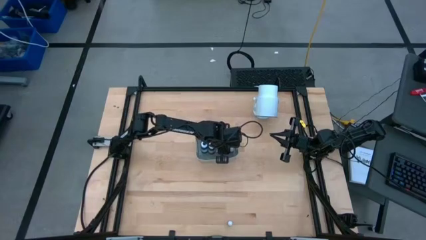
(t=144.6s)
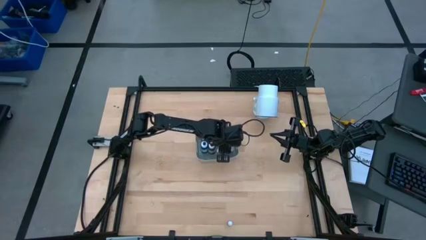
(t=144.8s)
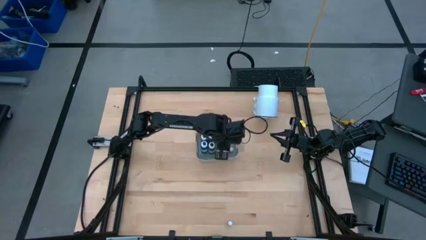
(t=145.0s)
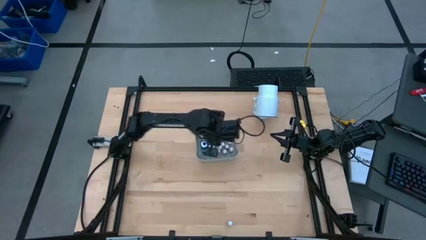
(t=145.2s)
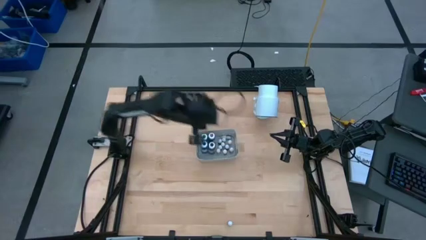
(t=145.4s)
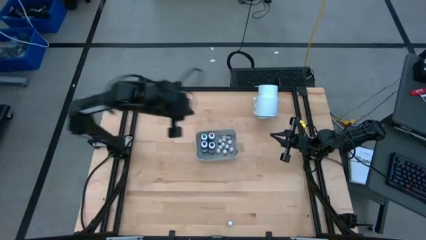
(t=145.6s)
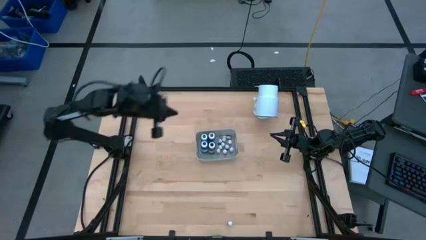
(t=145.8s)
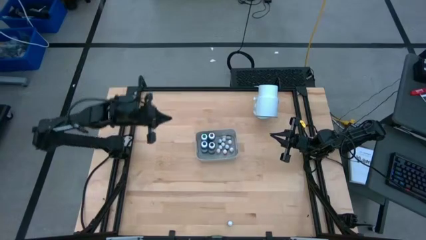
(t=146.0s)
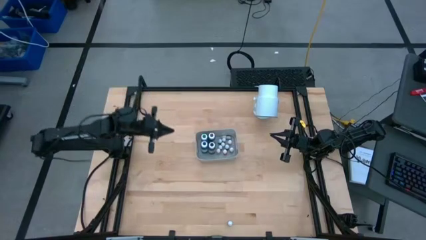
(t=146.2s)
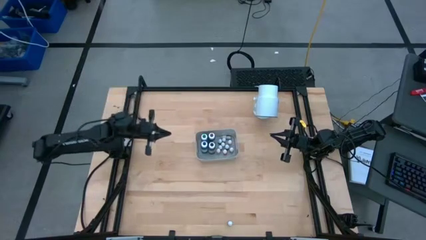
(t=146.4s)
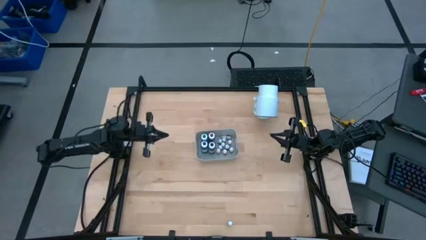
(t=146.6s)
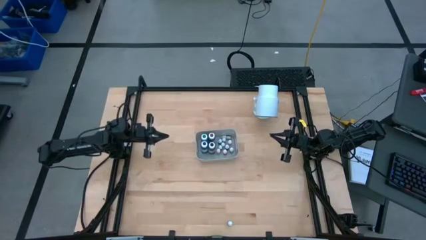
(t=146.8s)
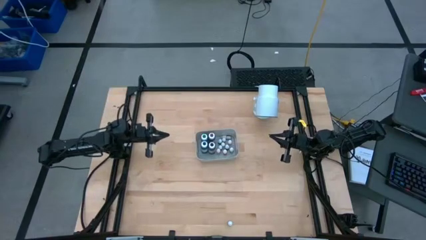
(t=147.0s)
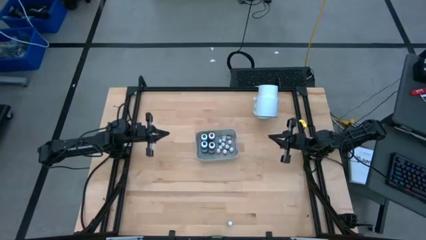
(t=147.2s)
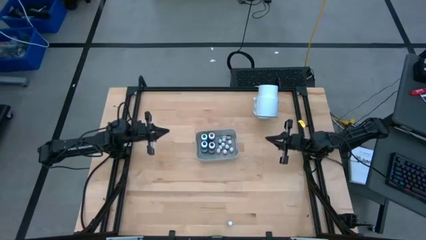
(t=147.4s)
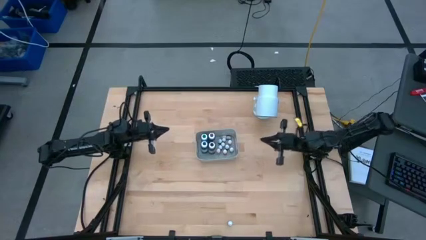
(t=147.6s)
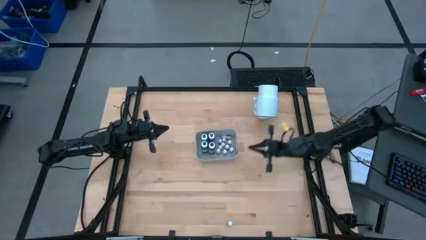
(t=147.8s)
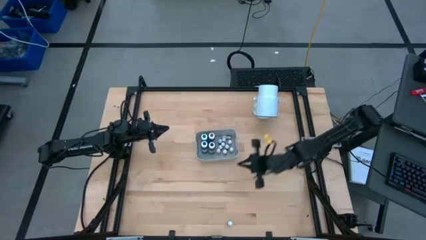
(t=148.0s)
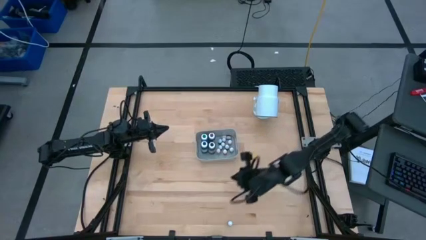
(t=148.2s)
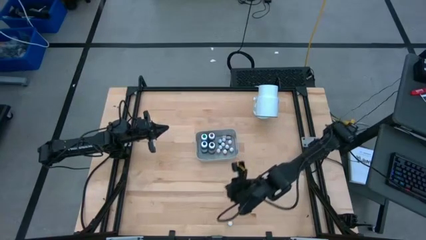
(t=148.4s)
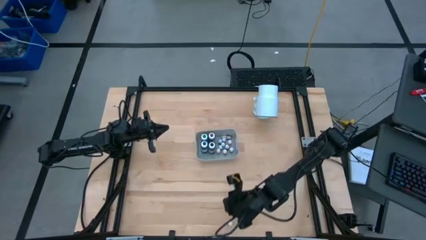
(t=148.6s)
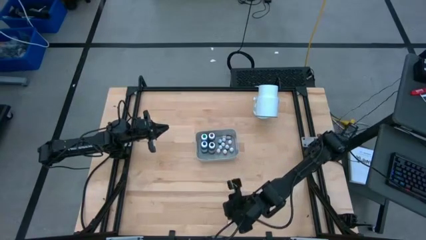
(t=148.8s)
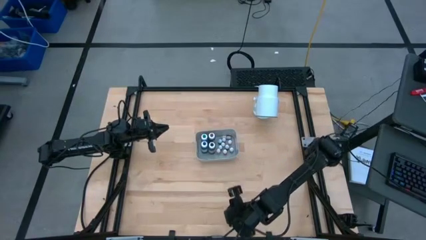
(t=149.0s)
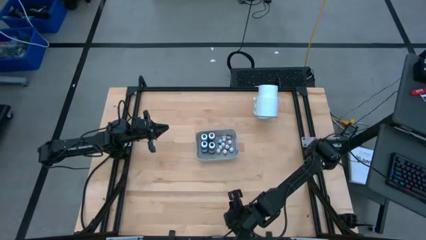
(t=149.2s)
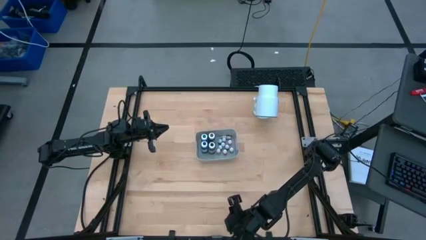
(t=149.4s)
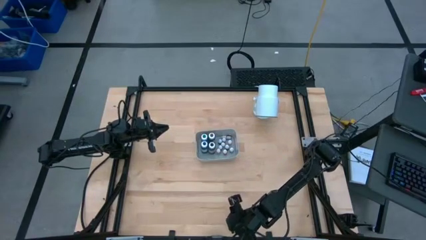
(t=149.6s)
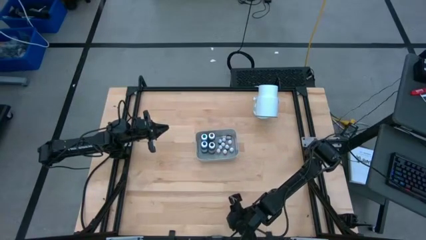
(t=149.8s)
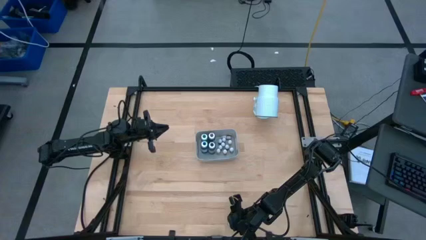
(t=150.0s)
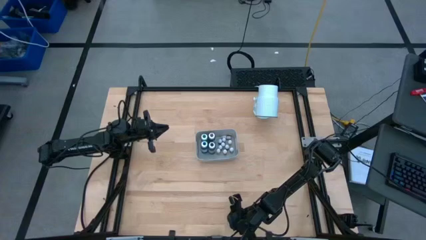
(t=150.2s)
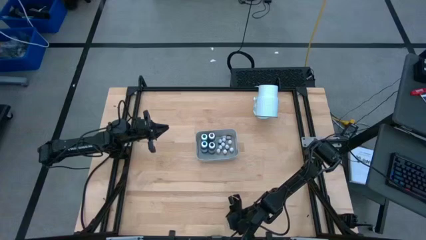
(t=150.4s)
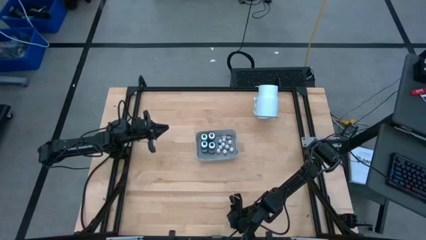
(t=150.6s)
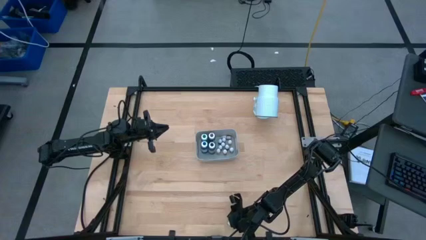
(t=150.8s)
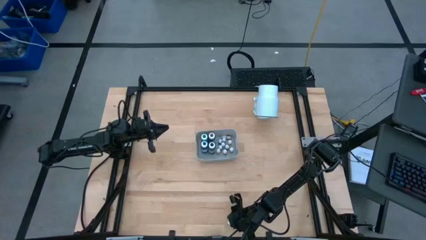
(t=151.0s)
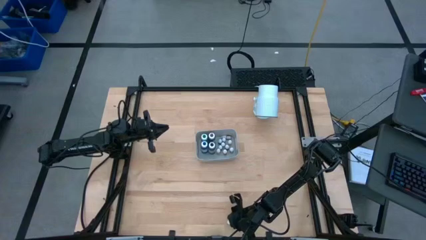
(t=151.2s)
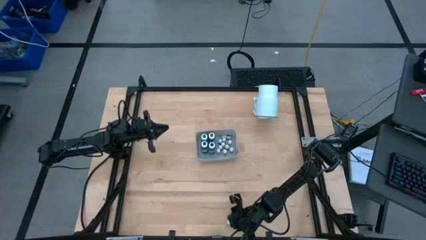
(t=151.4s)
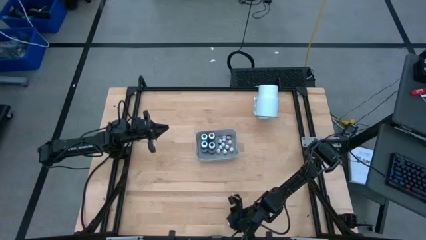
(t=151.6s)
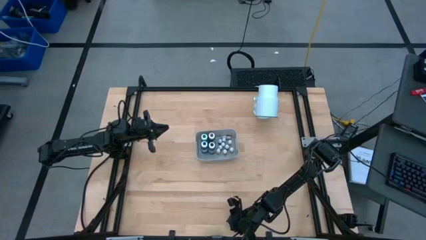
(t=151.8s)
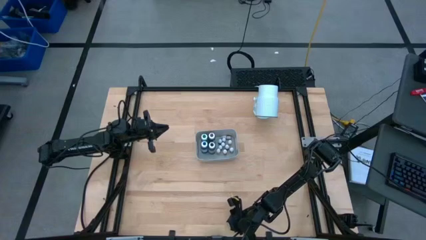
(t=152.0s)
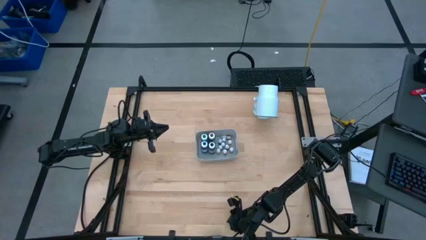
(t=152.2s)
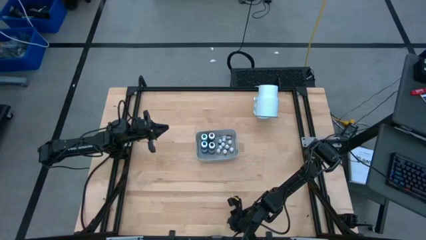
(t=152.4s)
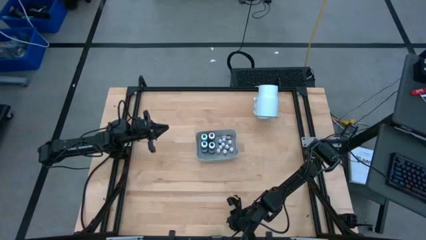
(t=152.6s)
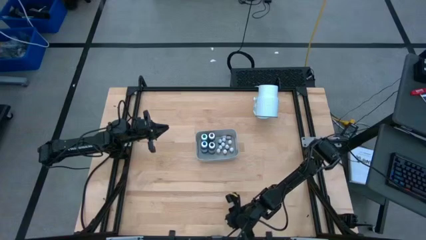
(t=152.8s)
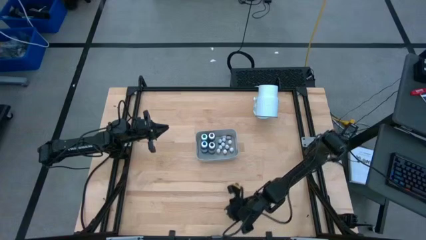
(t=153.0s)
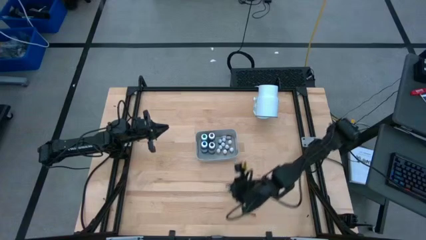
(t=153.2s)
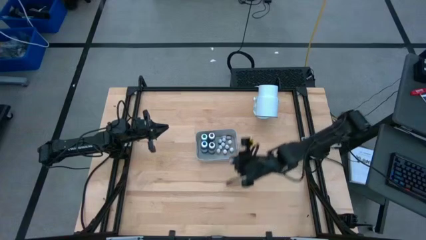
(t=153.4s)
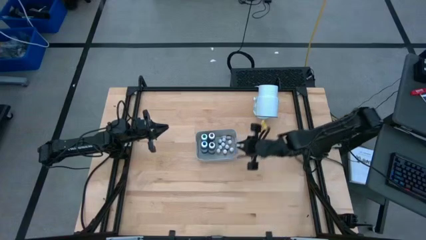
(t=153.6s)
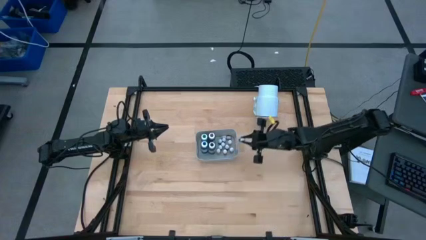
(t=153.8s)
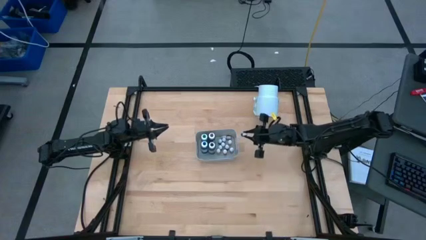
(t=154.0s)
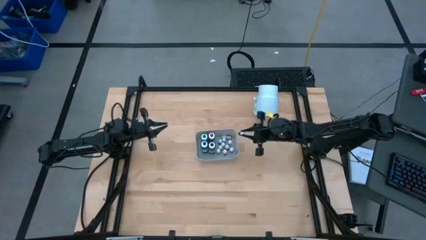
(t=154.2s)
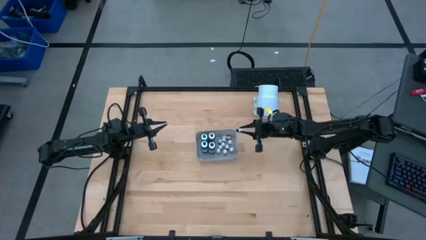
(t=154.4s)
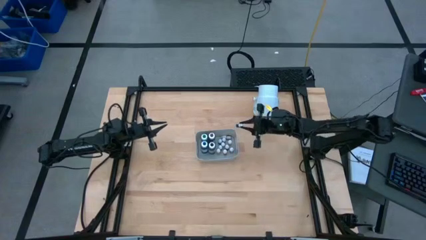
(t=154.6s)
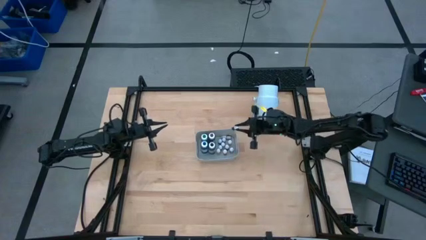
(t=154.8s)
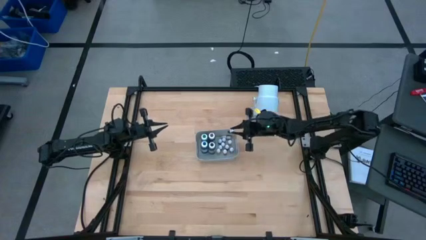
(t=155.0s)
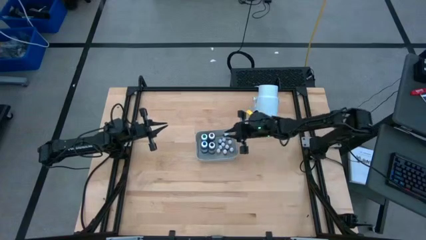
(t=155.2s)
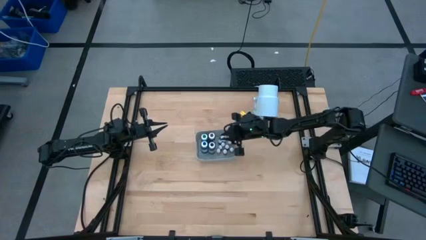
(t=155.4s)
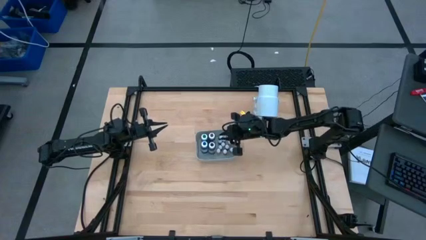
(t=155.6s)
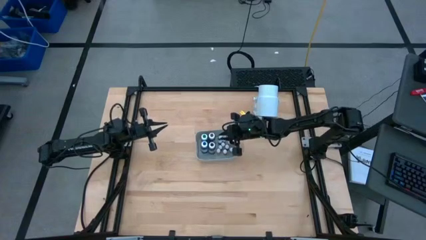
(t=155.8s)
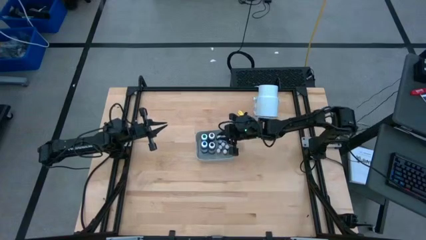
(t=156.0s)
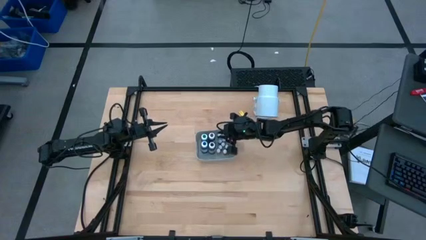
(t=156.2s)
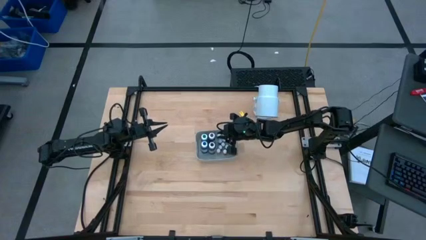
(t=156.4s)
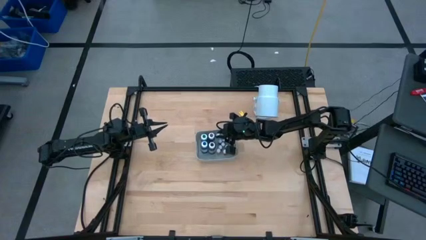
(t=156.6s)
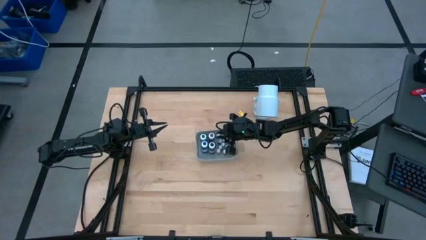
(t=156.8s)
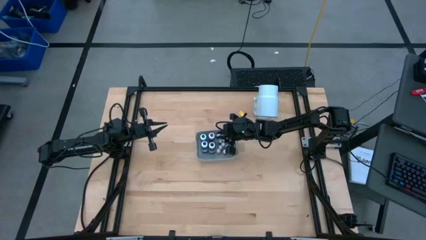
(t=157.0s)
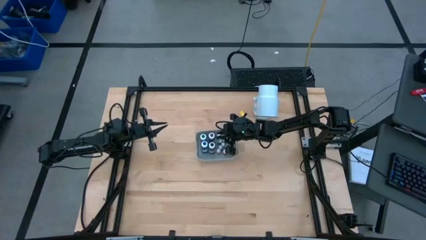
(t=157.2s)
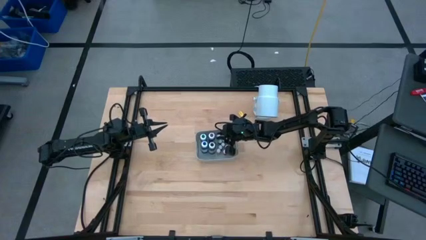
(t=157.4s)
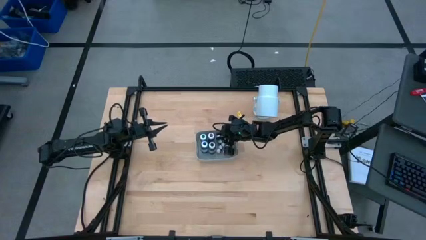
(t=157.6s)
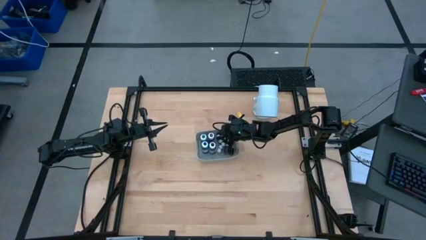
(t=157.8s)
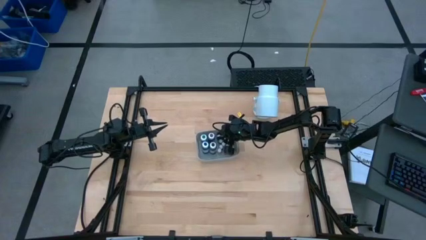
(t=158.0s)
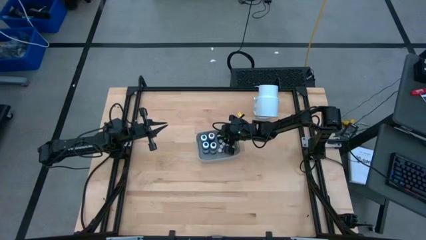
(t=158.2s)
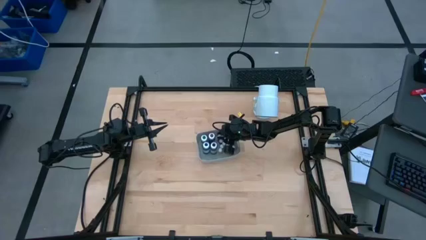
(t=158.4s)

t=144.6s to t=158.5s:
Task: Pick & Place food coloring
Put the small blue food coloring bottle into the gray bin

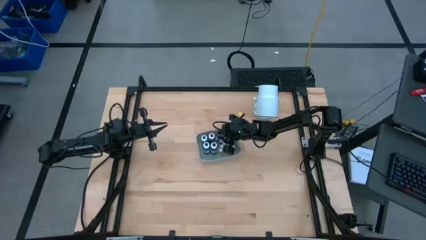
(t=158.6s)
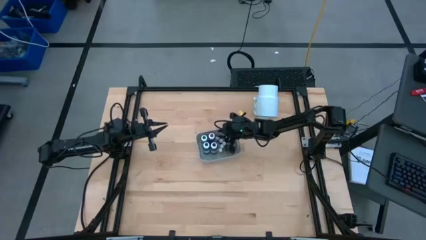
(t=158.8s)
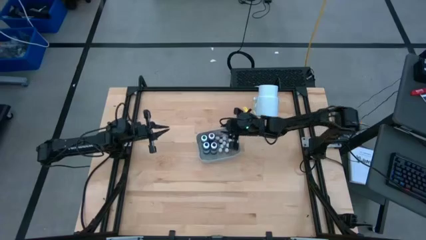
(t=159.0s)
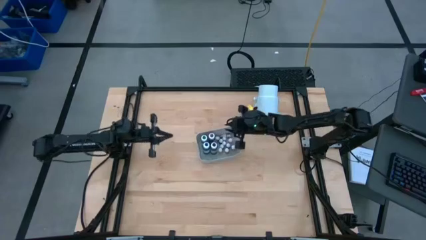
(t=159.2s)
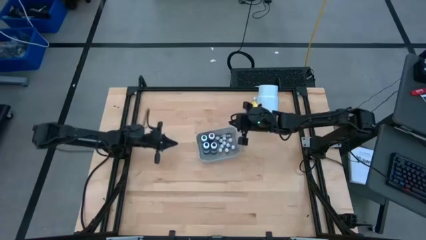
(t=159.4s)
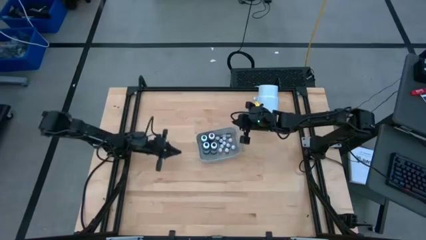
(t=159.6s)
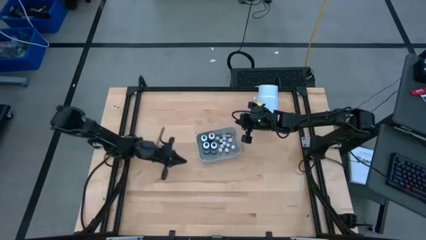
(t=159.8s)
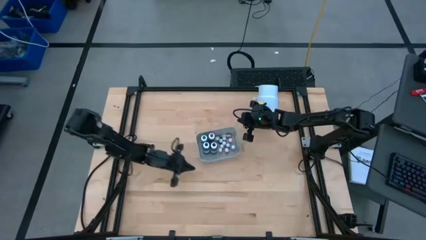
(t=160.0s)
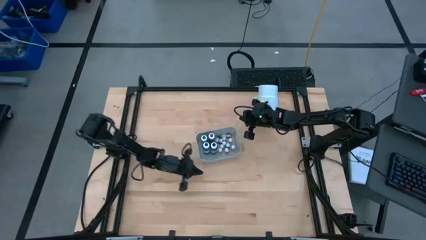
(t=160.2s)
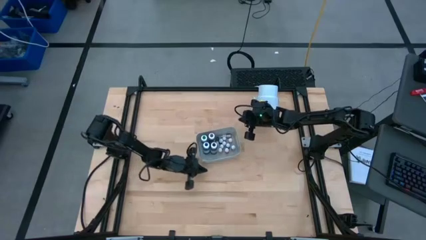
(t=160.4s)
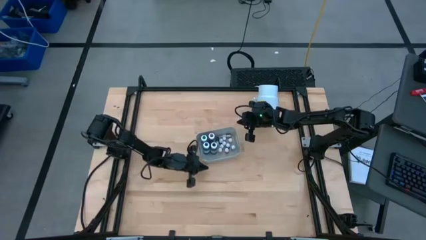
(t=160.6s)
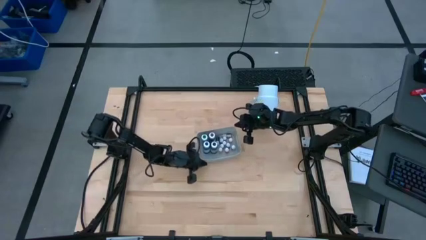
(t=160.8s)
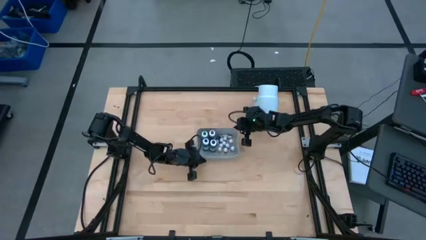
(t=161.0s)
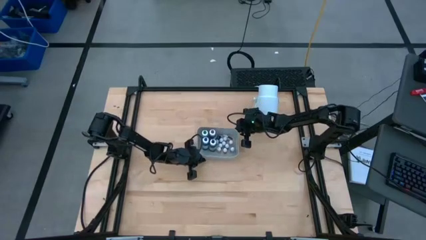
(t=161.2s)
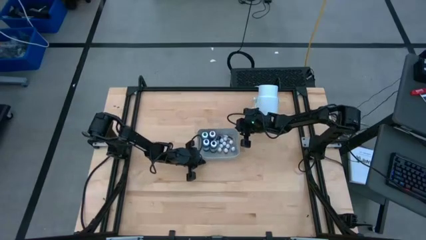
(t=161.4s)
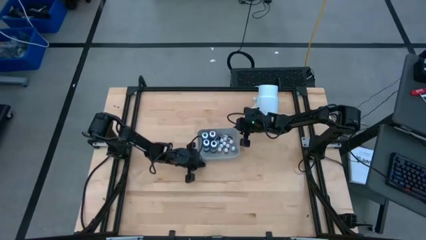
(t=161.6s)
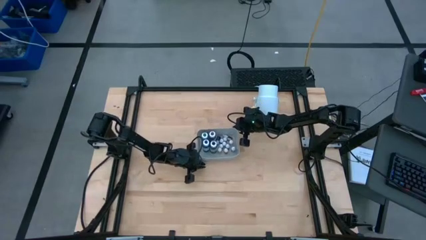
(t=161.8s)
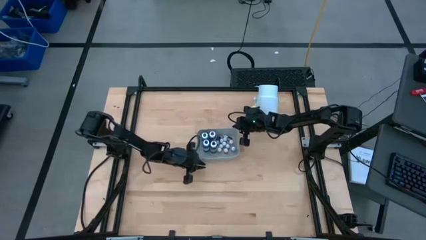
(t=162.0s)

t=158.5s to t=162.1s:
Adjust the gray bin
